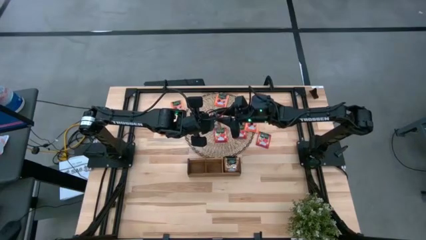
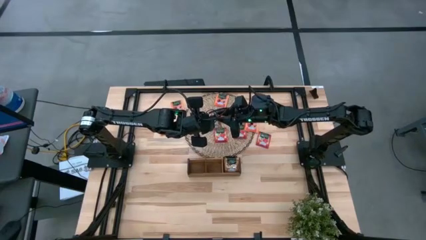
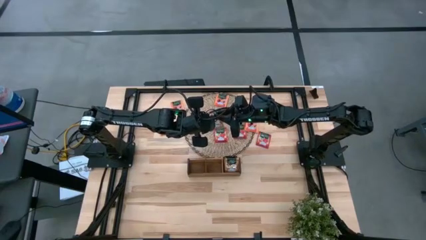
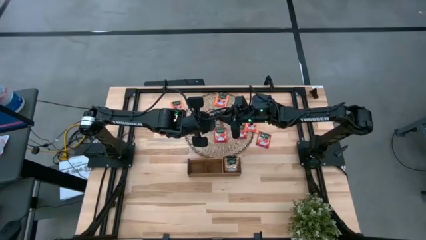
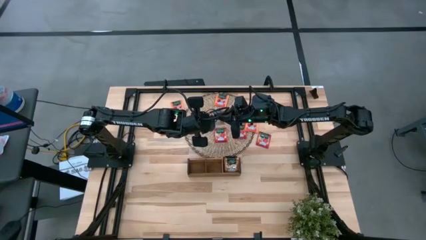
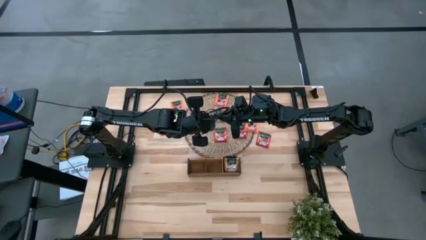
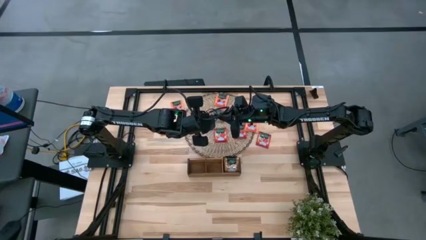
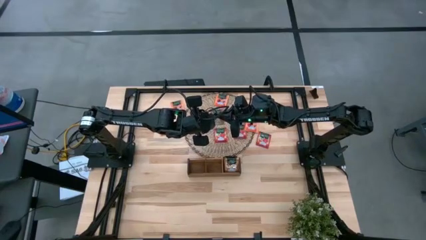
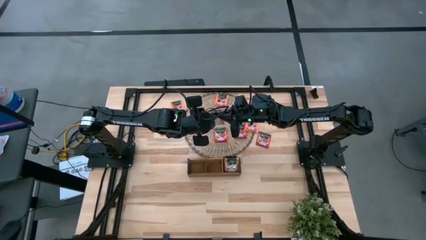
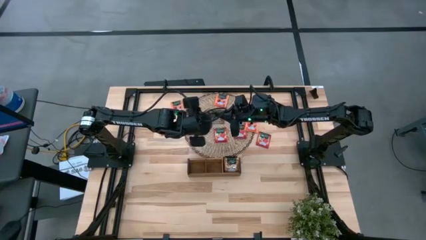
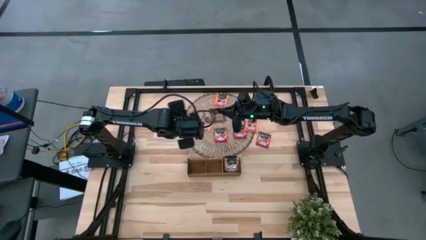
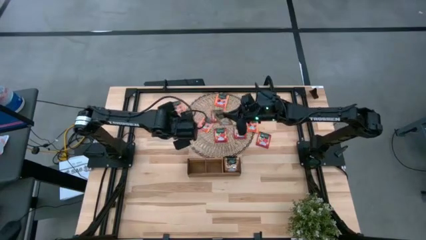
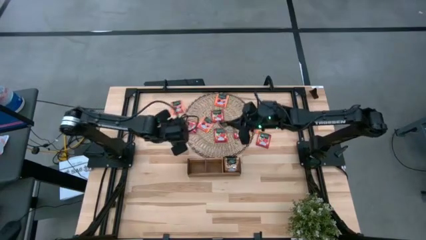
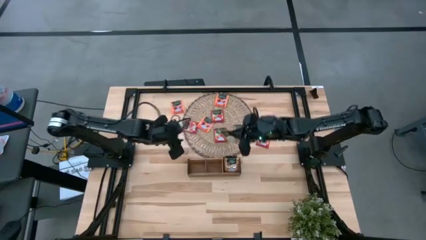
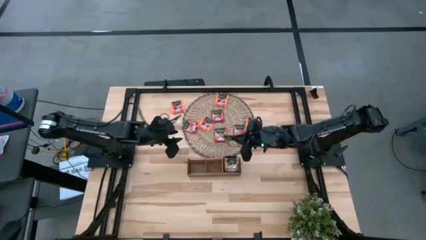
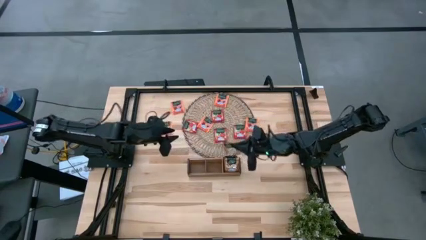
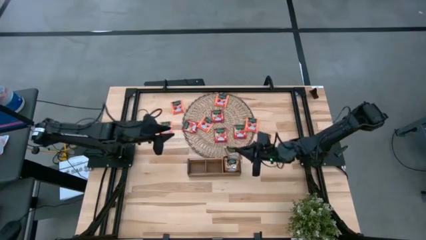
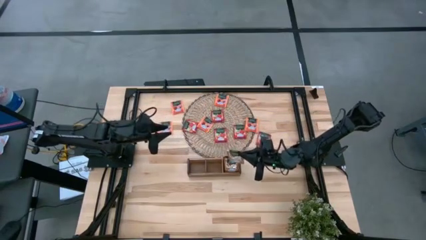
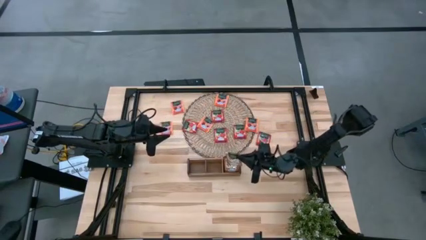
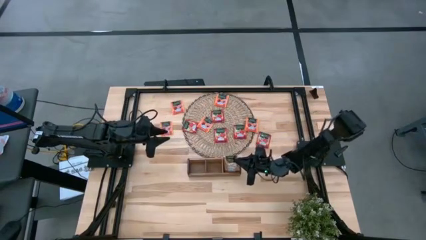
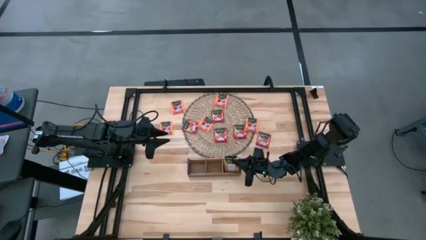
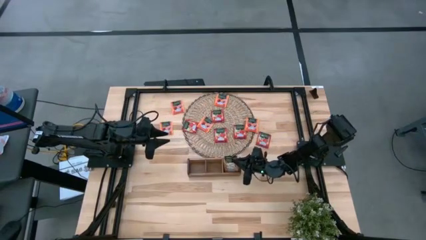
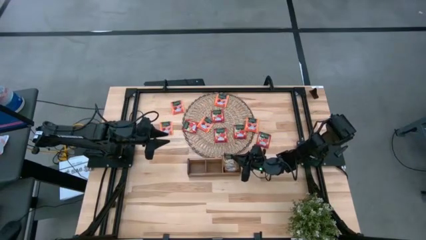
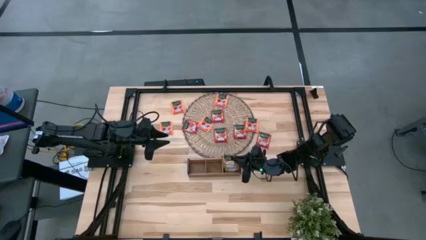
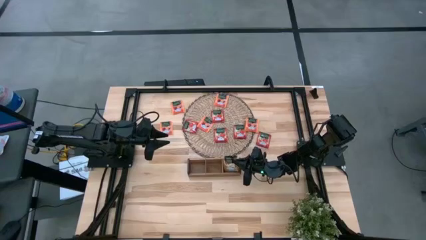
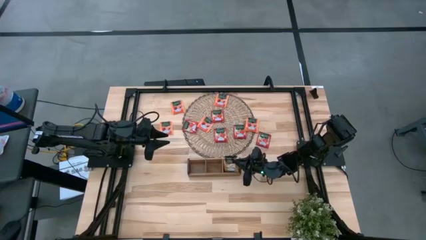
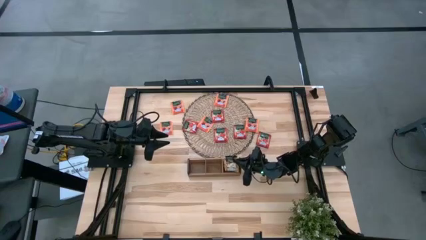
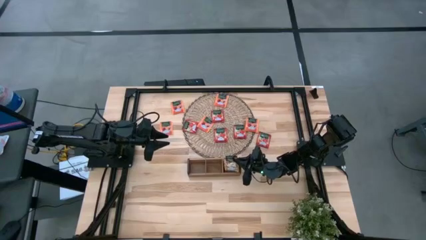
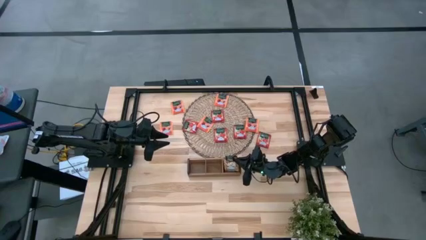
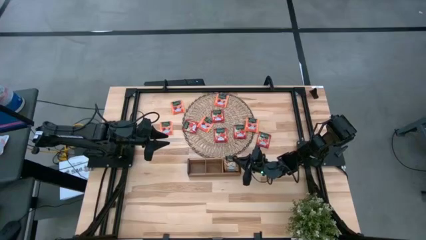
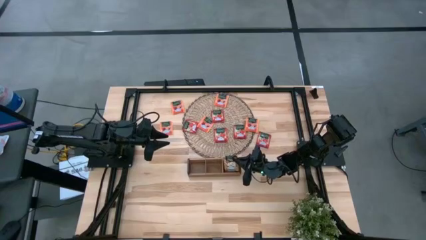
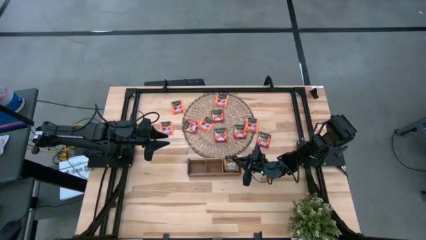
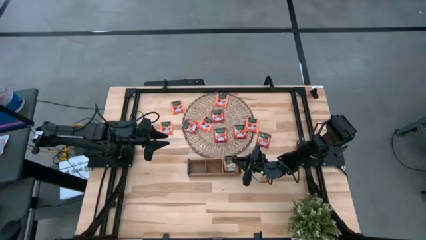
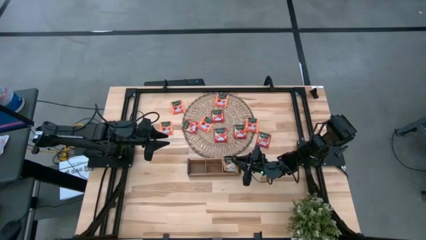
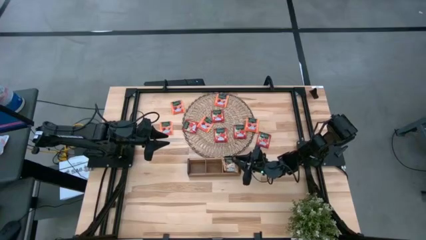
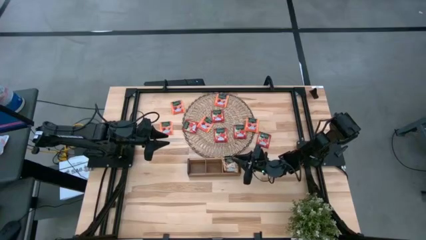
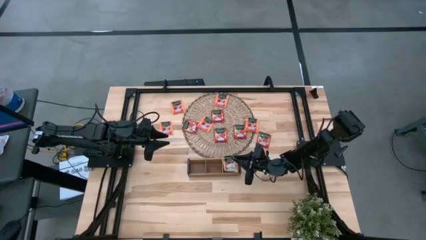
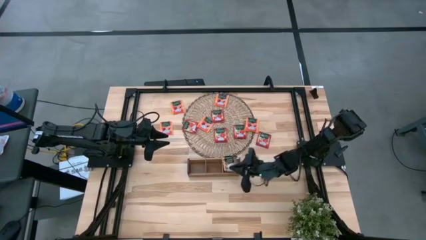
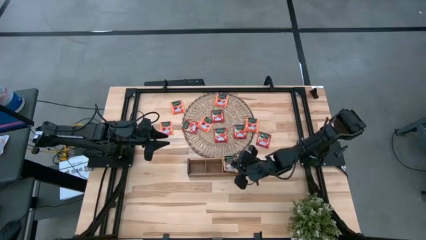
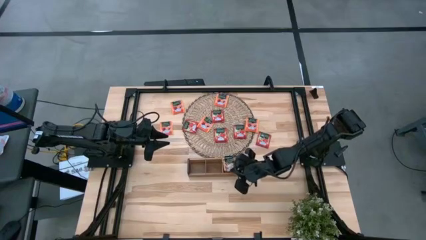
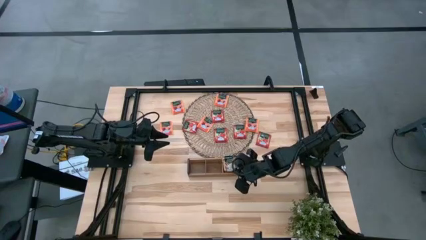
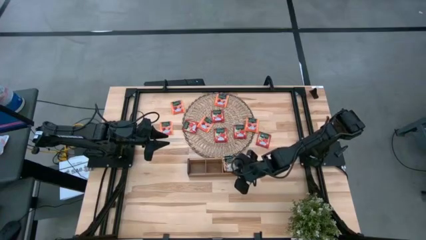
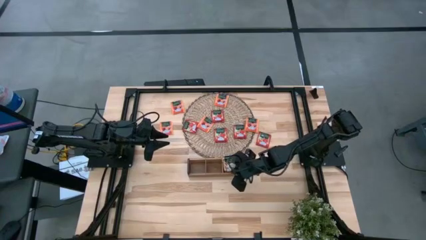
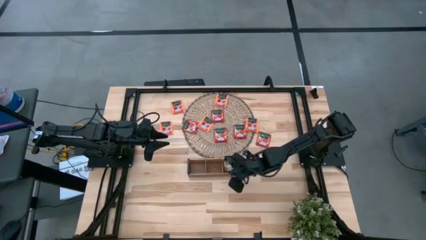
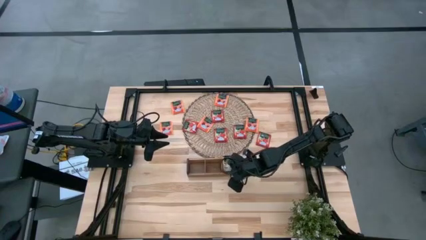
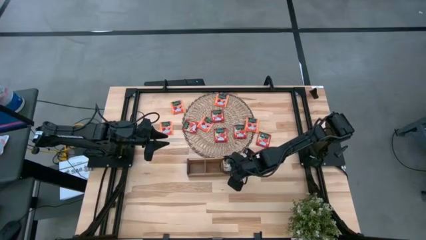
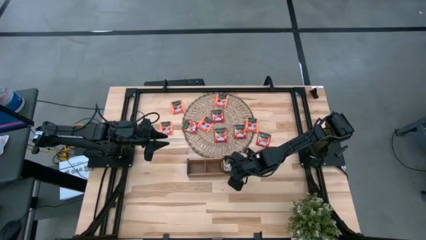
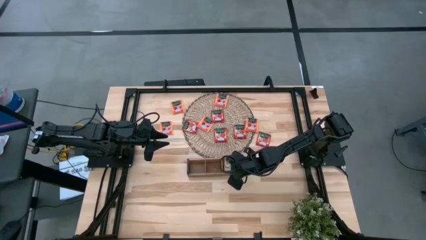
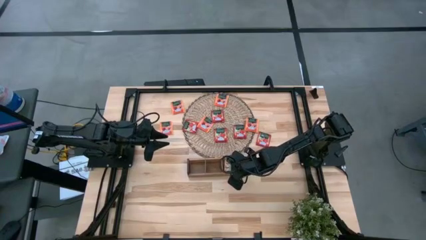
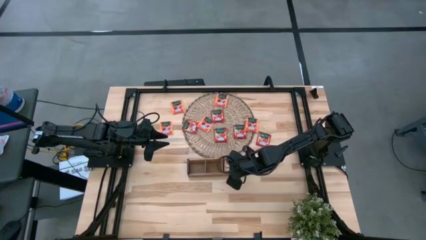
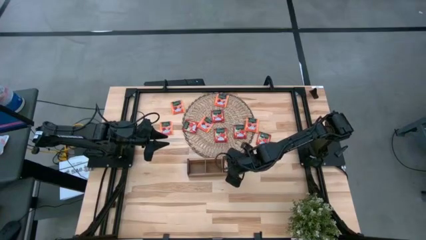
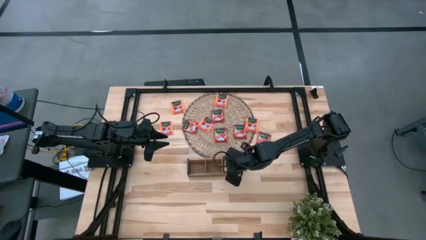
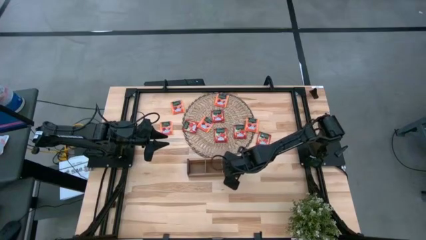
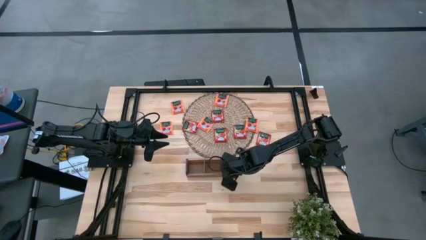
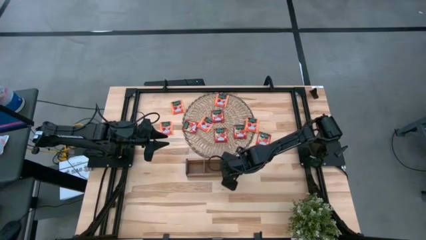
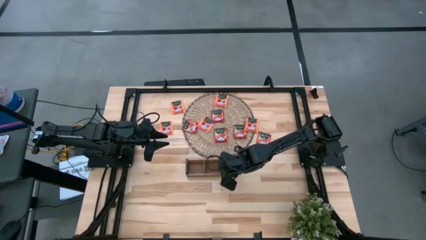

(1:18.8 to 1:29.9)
Task: Pick & Place Tea
Put the gold tea bag into the right section of the wooden organizer
